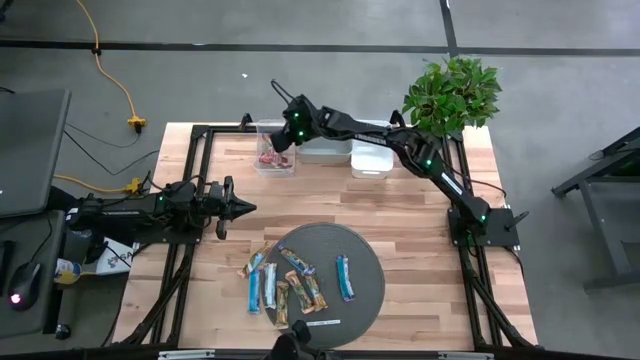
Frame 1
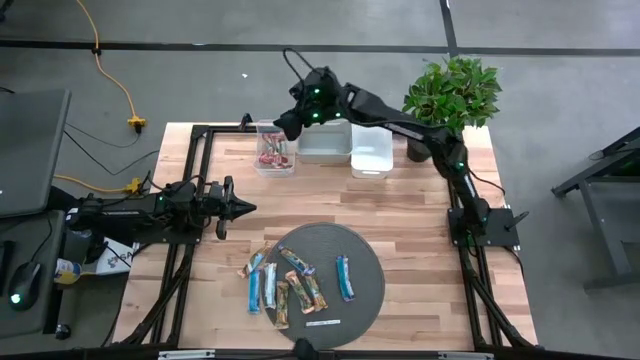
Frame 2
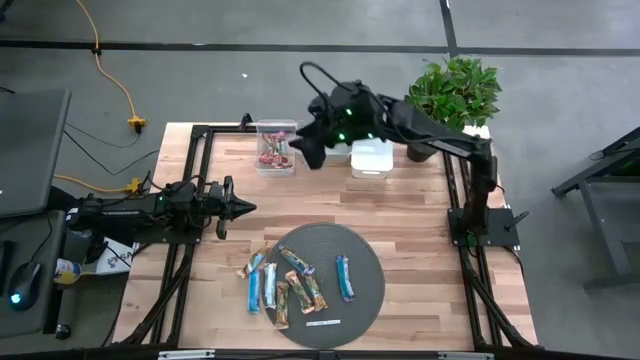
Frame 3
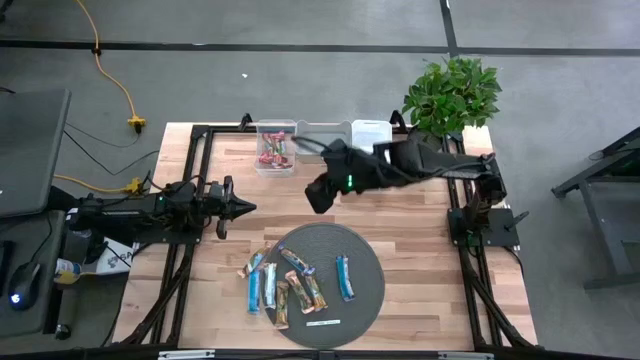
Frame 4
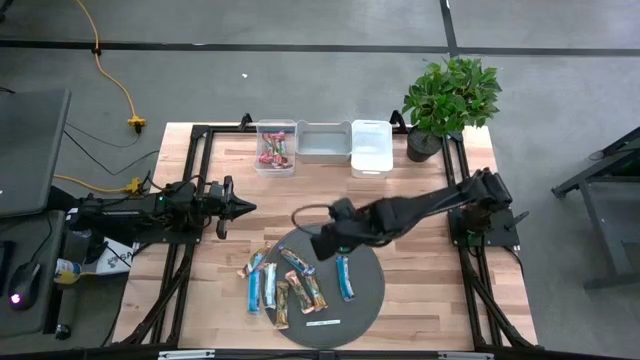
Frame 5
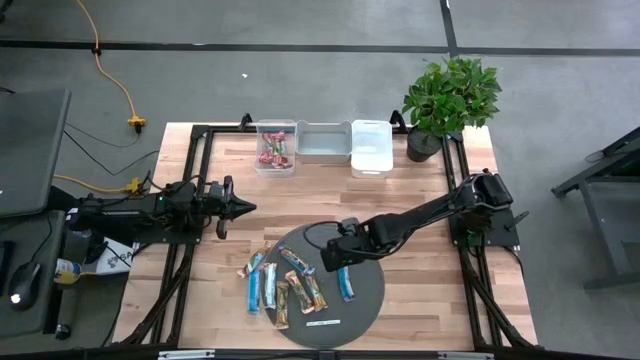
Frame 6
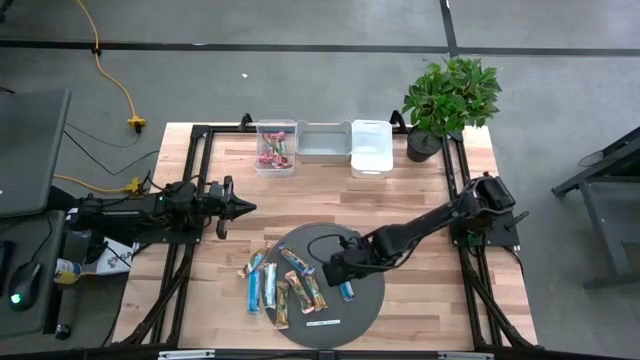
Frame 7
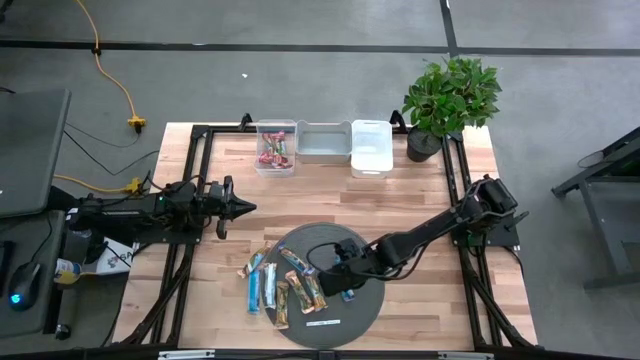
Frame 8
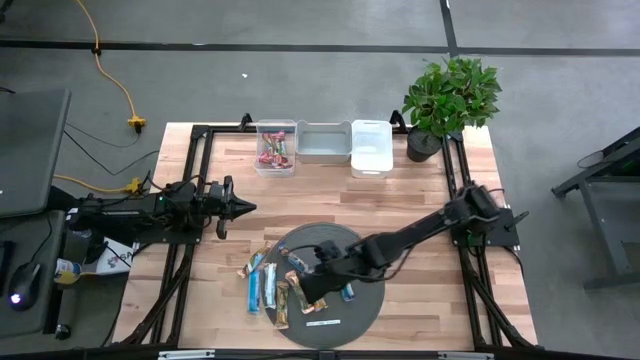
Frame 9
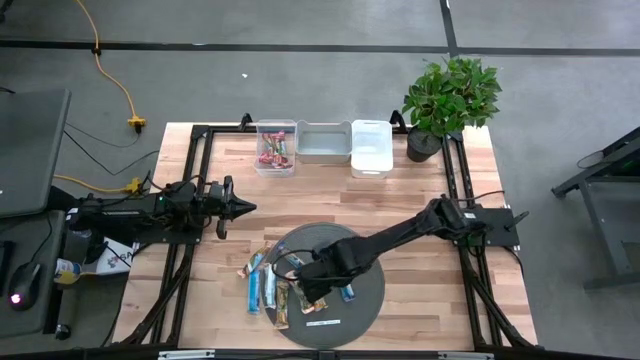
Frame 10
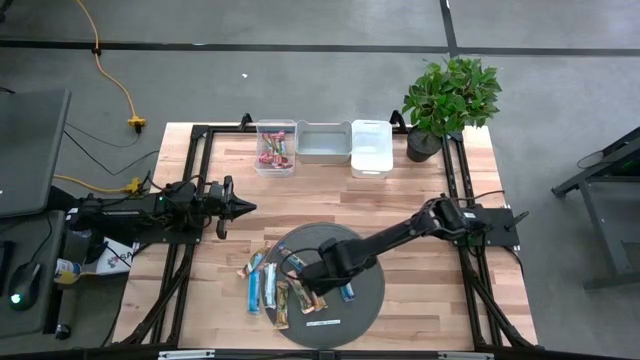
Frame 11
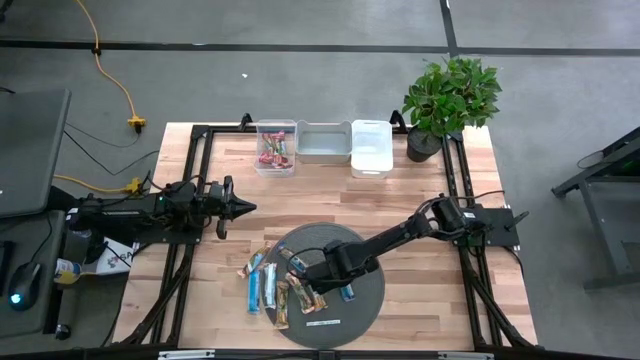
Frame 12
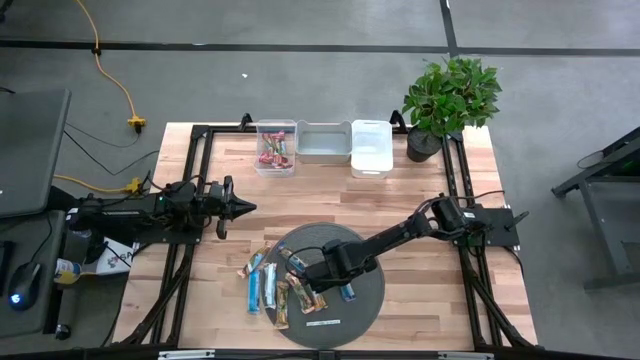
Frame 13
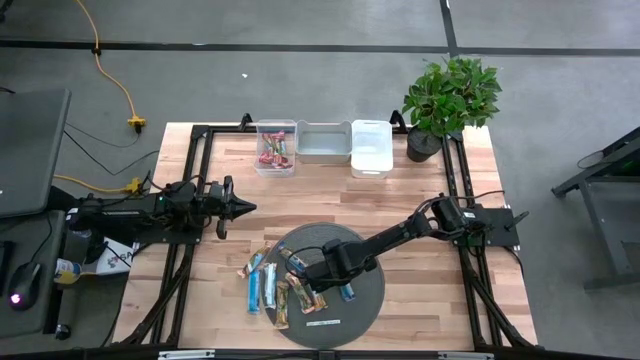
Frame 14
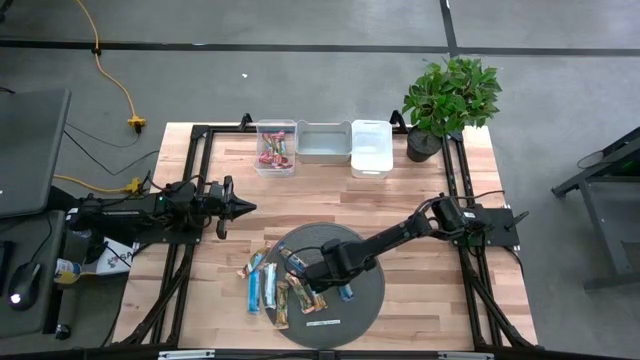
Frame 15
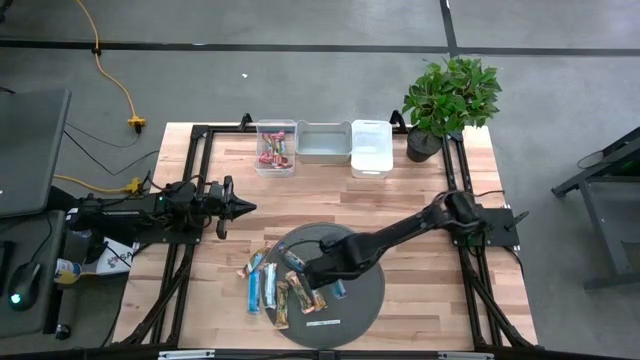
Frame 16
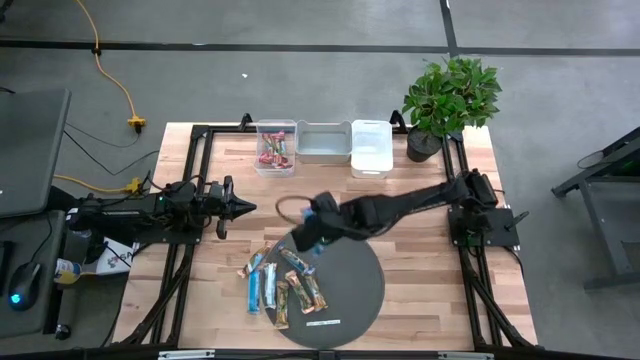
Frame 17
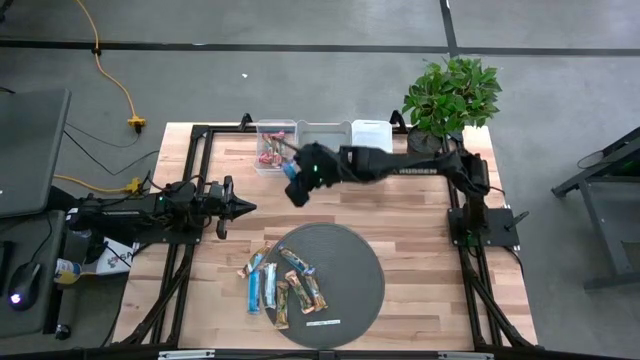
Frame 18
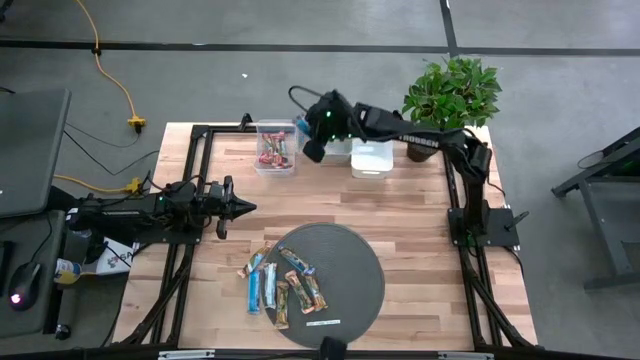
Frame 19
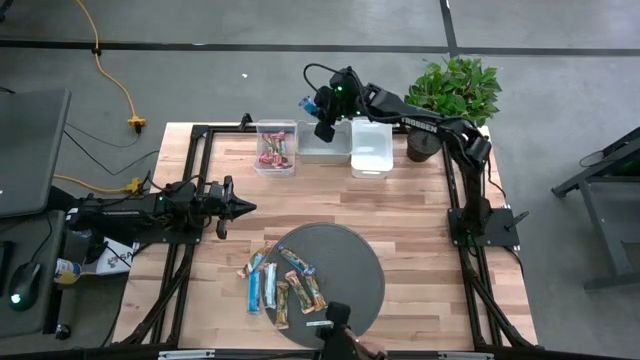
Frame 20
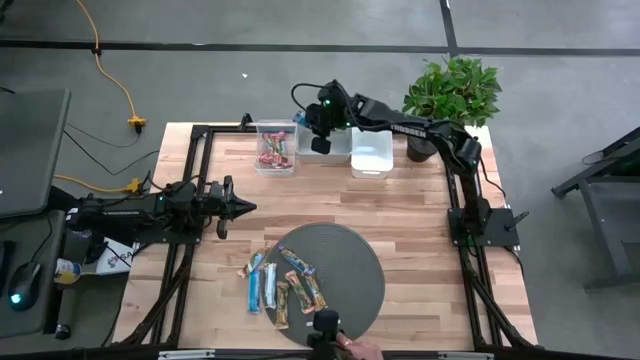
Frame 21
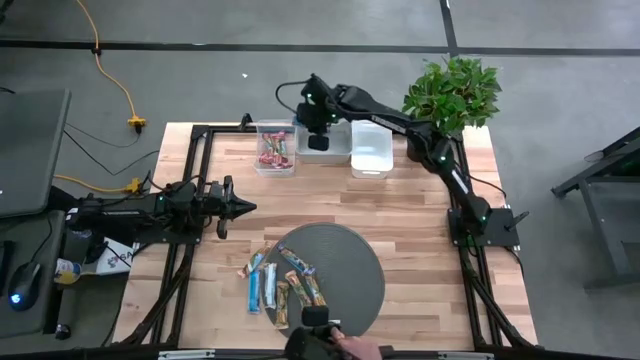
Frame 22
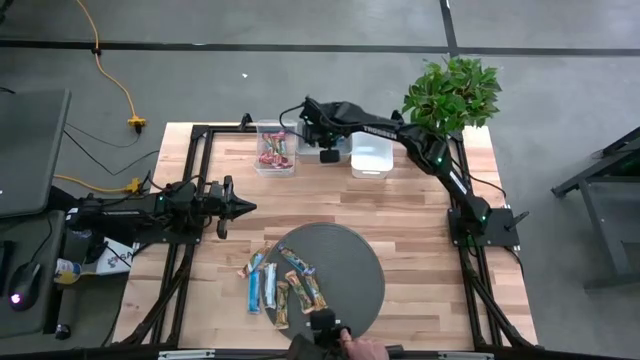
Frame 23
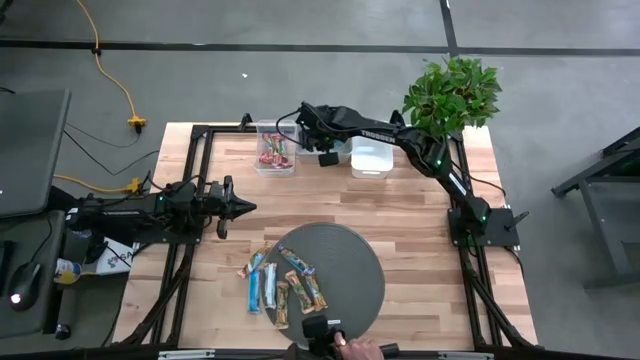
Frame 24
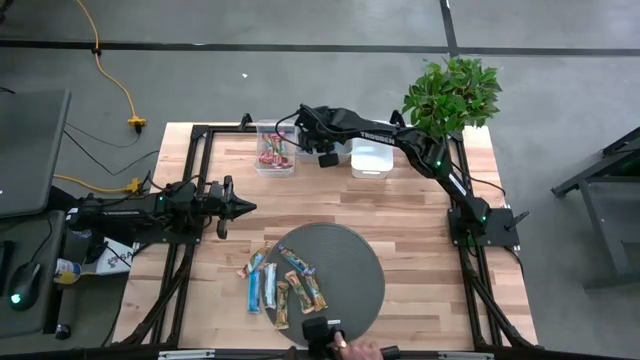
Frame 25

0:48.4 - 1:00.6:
Task: Pick and place Granola Bars by type
Put the blue granola bar into the gray bin

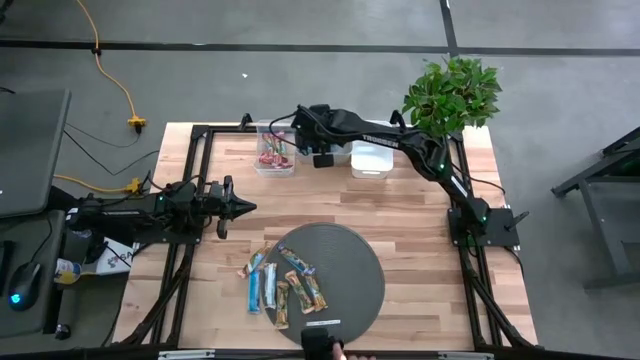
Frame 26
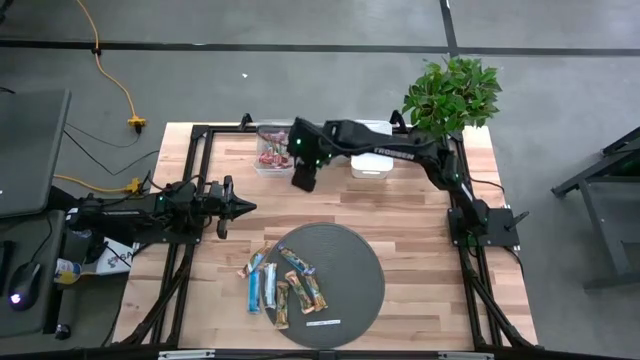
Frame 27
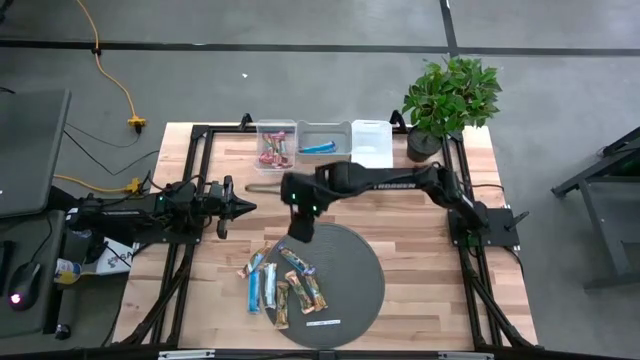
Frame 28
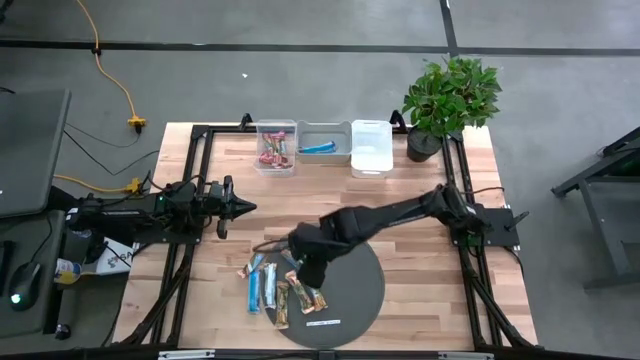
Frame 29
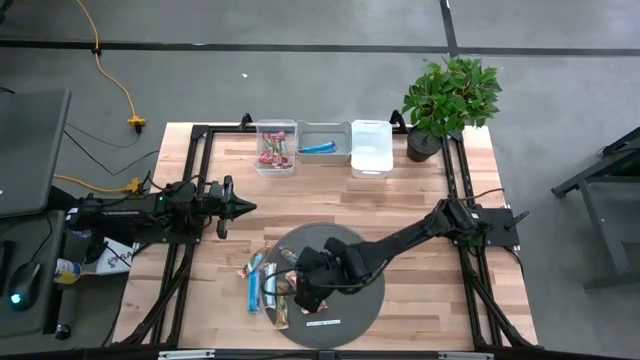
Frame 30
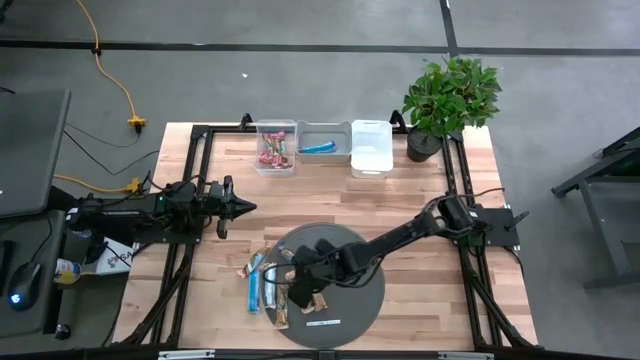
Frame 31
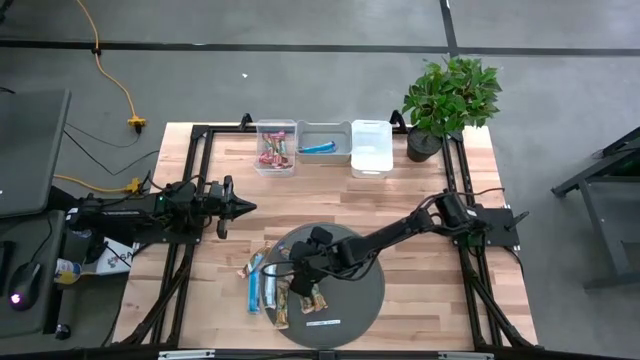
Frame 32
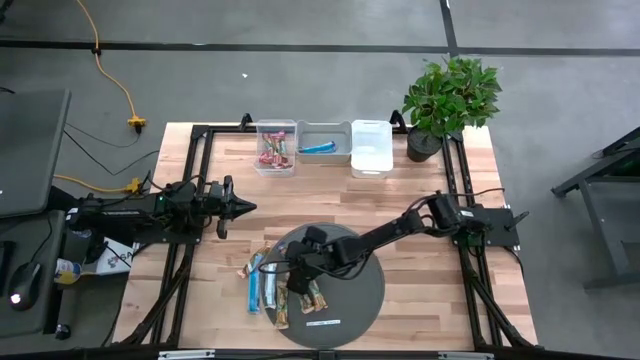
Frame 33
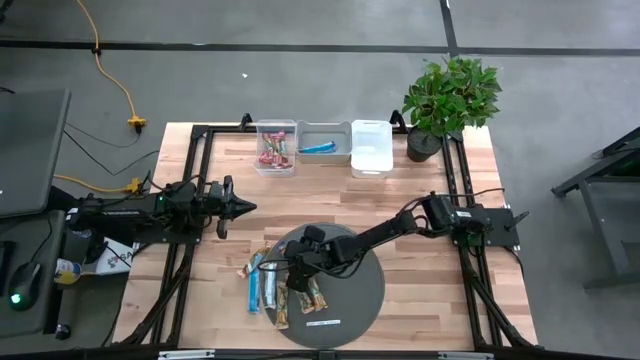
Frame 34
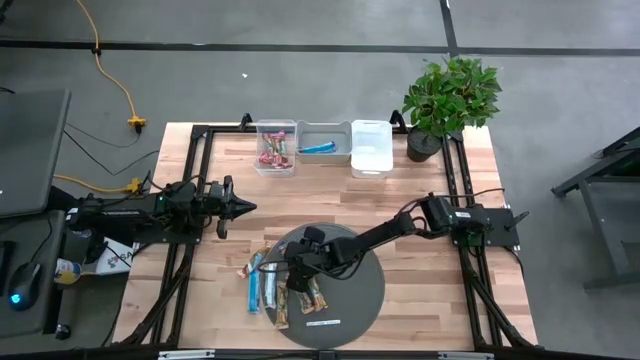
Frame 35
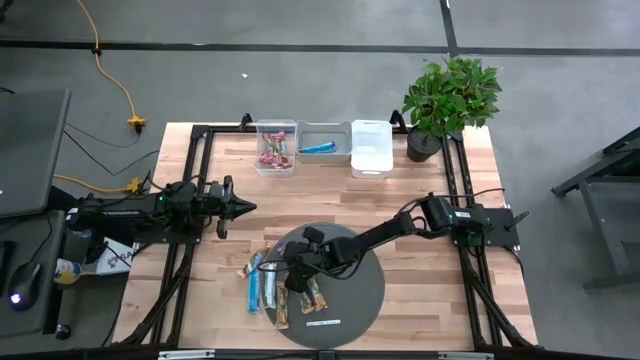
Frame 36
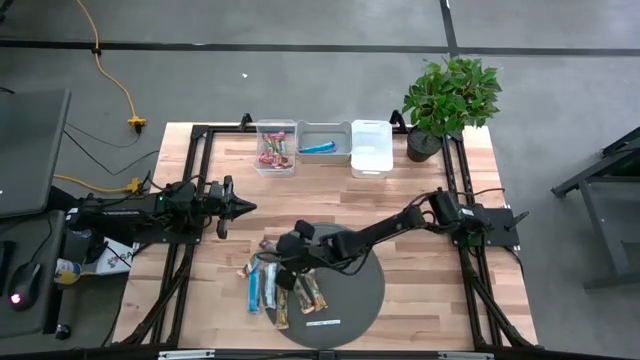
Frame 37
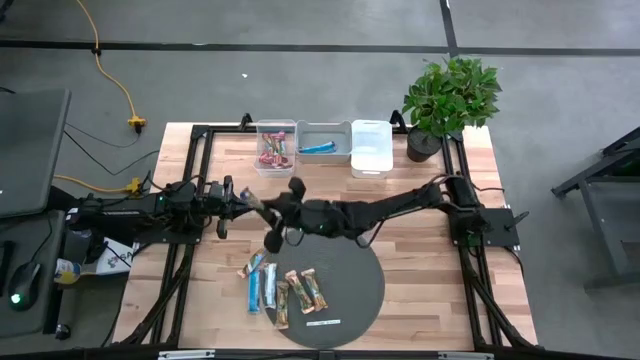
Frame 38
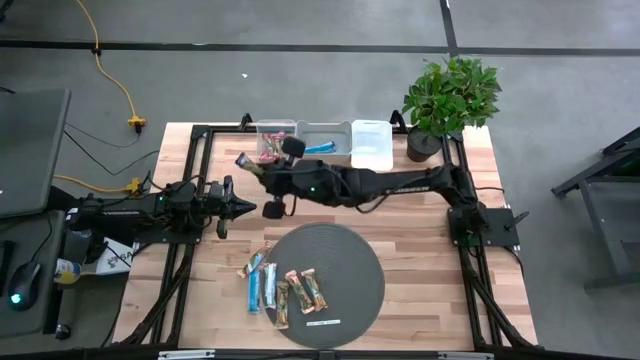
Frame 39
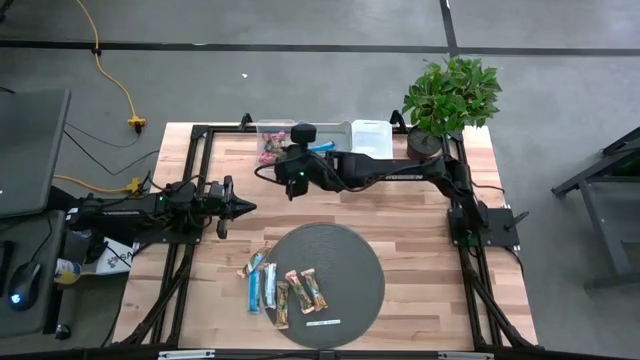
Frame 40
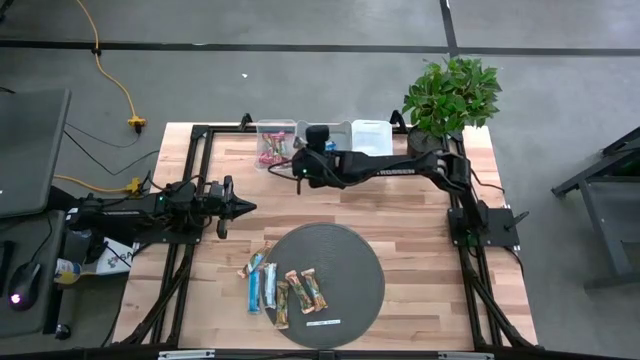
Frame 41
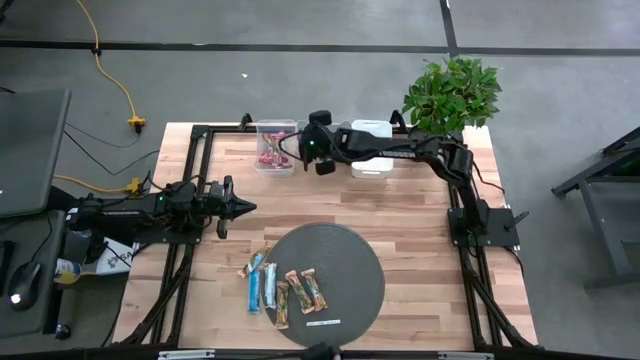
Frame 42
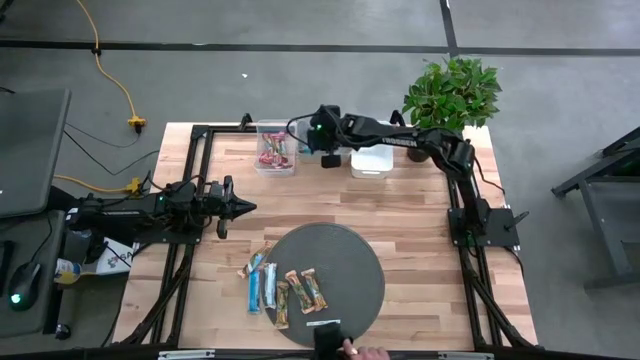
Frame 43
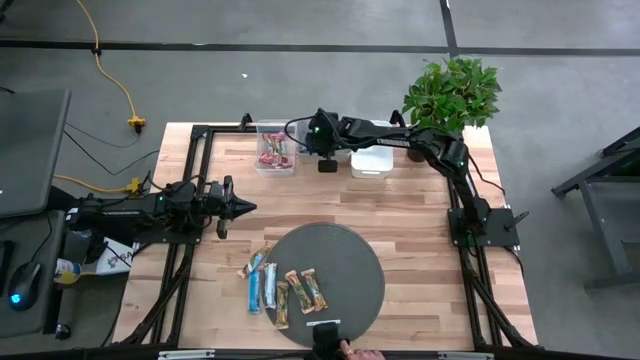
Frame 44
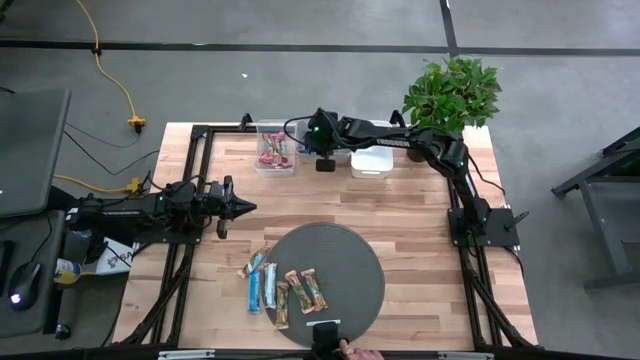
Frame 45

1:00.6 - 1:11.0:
Put the blue granola bar into the gray bin
